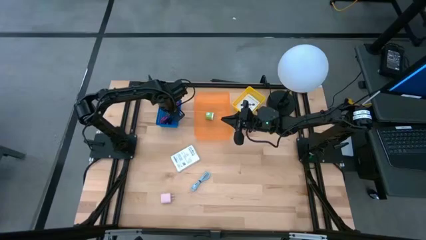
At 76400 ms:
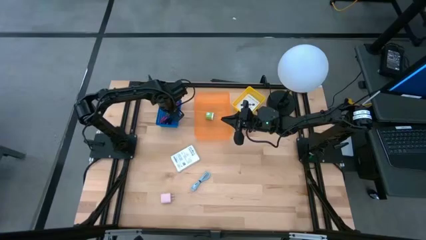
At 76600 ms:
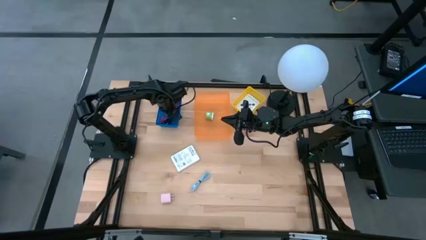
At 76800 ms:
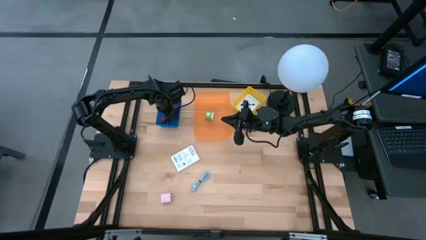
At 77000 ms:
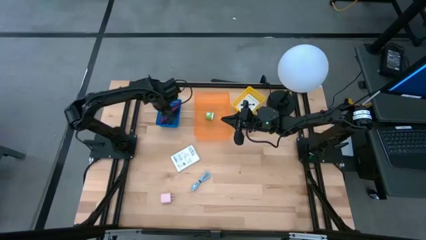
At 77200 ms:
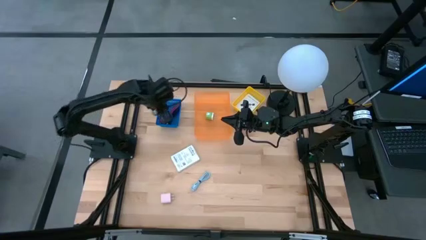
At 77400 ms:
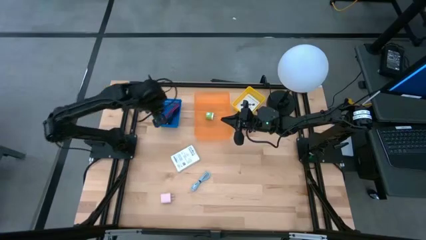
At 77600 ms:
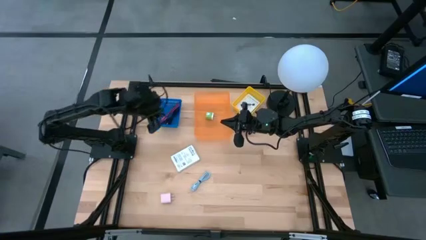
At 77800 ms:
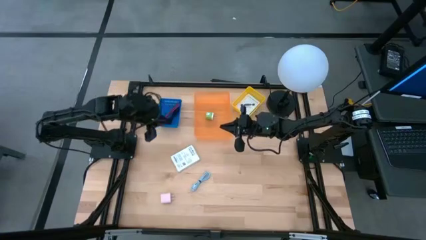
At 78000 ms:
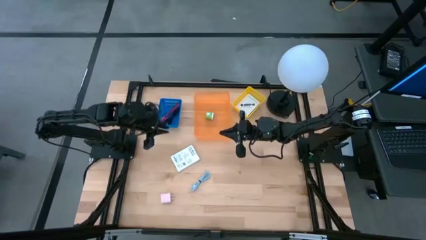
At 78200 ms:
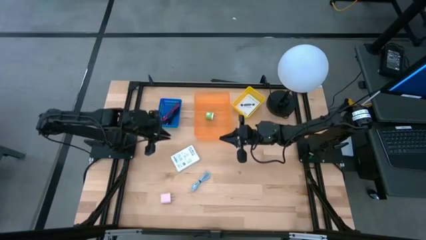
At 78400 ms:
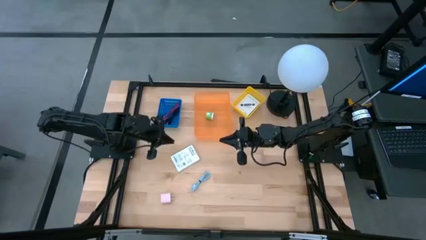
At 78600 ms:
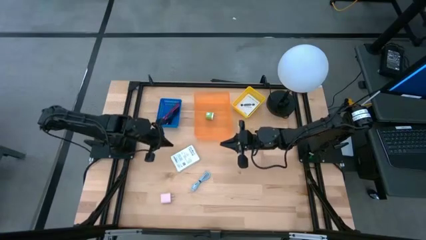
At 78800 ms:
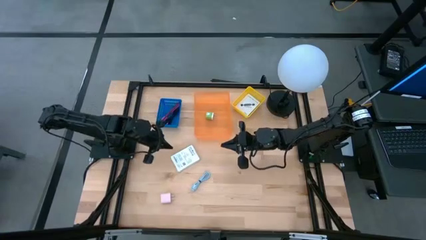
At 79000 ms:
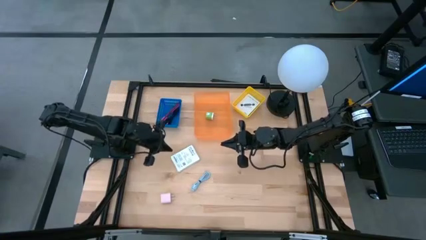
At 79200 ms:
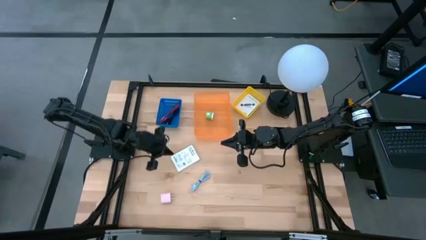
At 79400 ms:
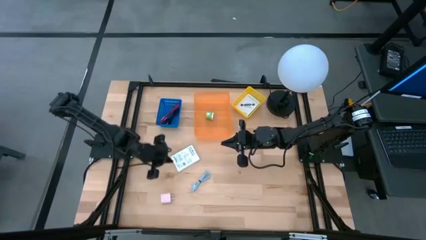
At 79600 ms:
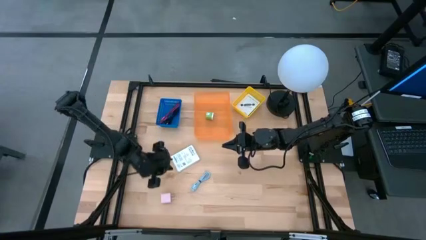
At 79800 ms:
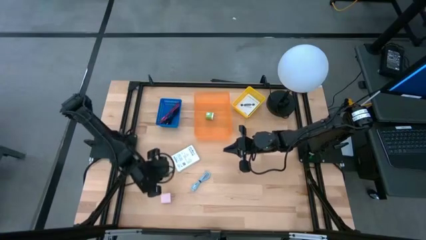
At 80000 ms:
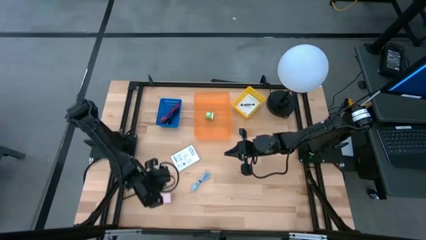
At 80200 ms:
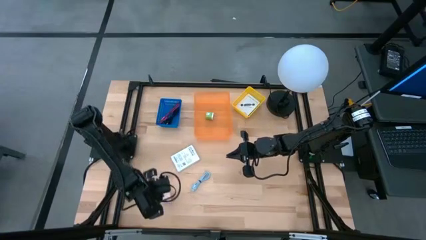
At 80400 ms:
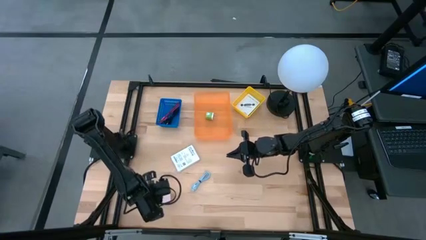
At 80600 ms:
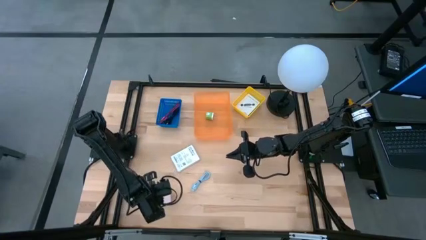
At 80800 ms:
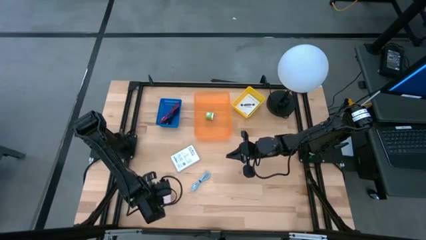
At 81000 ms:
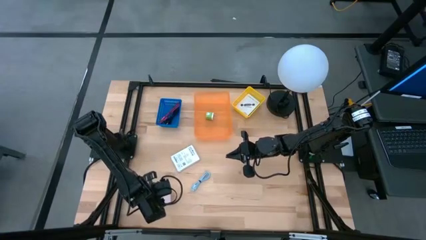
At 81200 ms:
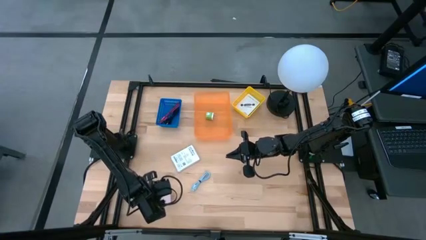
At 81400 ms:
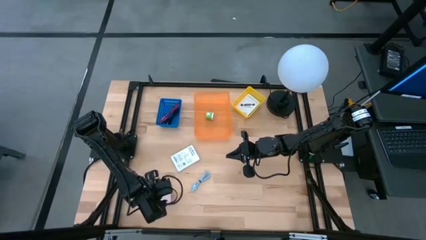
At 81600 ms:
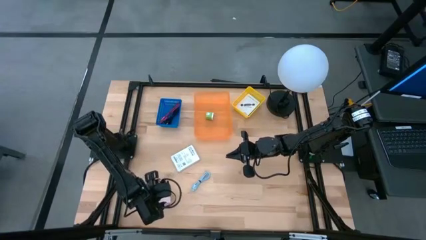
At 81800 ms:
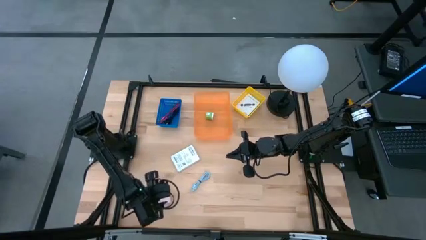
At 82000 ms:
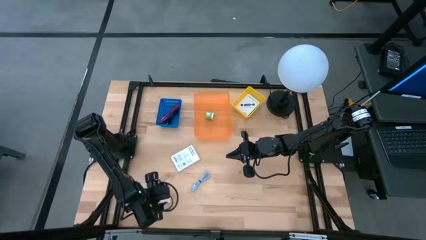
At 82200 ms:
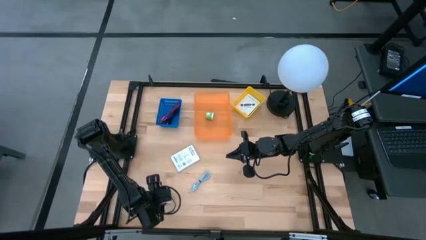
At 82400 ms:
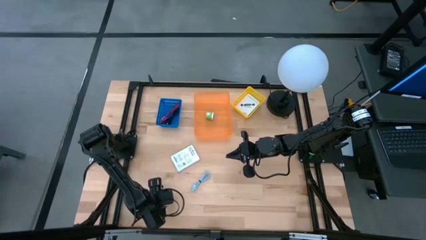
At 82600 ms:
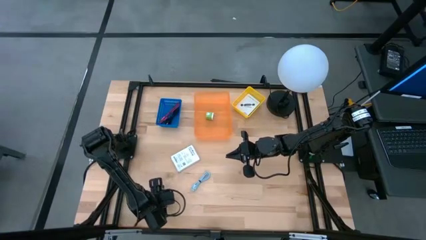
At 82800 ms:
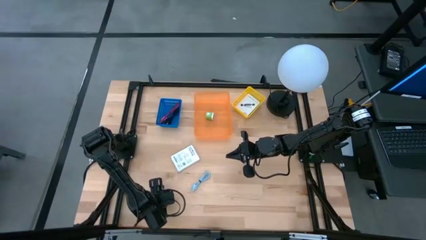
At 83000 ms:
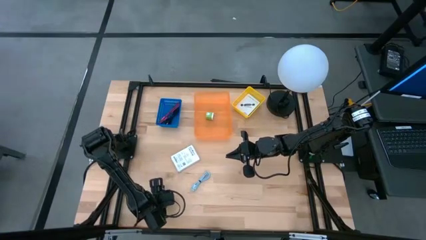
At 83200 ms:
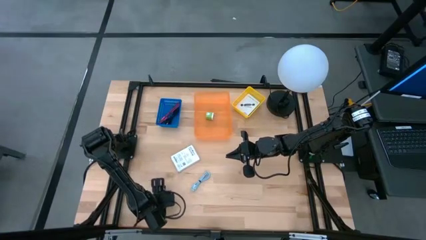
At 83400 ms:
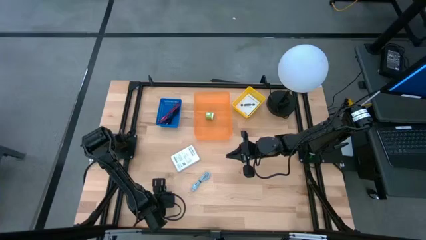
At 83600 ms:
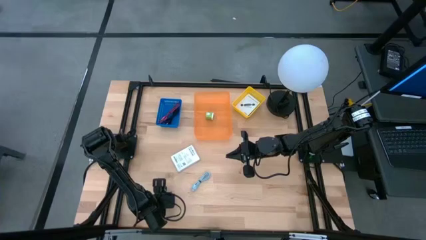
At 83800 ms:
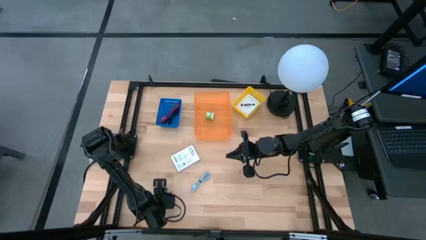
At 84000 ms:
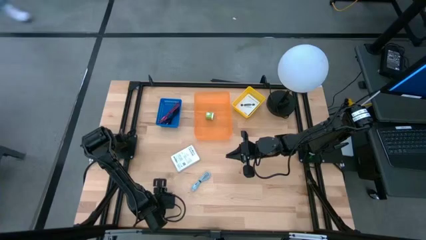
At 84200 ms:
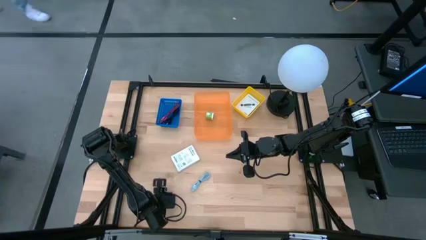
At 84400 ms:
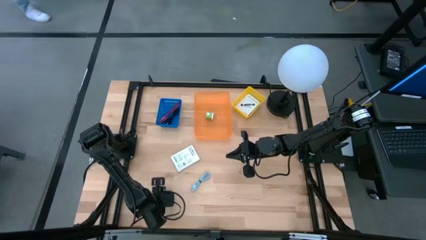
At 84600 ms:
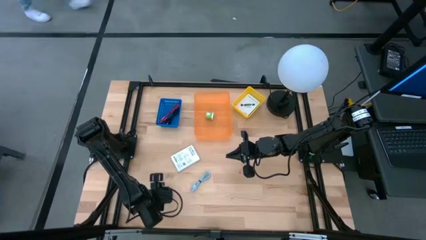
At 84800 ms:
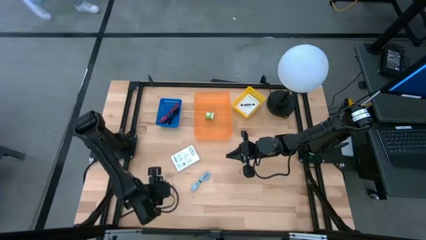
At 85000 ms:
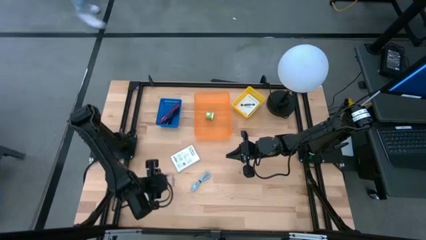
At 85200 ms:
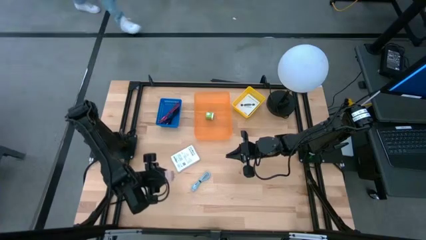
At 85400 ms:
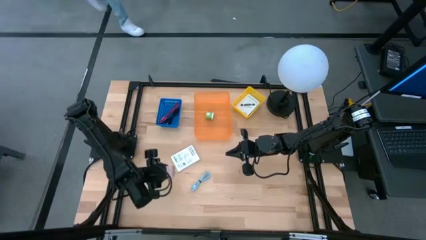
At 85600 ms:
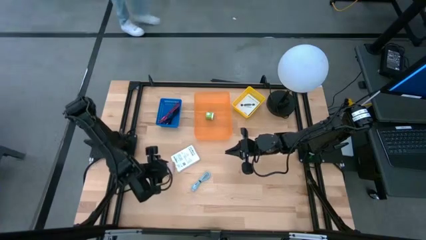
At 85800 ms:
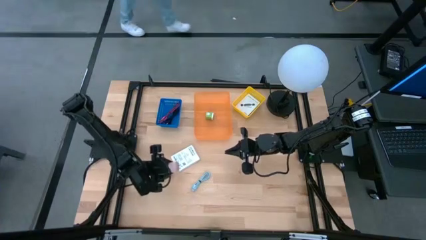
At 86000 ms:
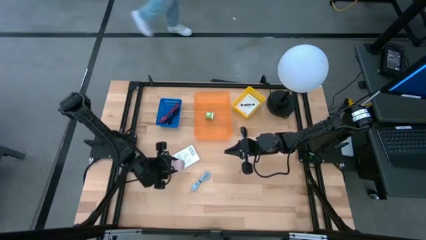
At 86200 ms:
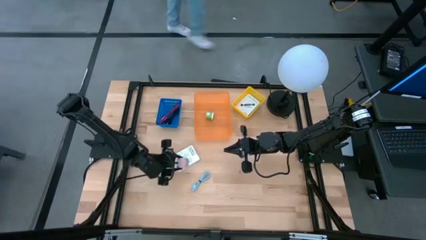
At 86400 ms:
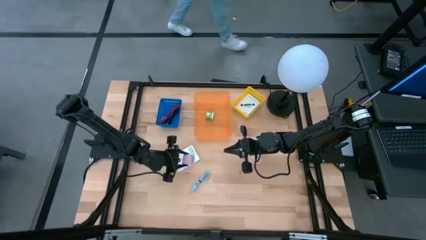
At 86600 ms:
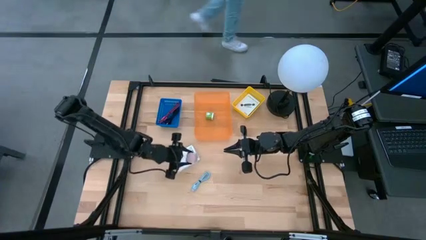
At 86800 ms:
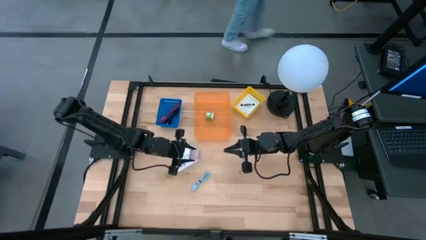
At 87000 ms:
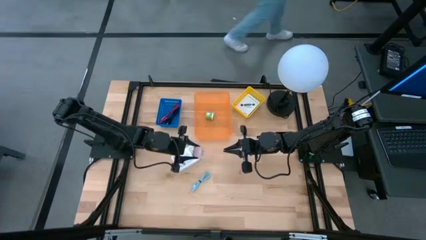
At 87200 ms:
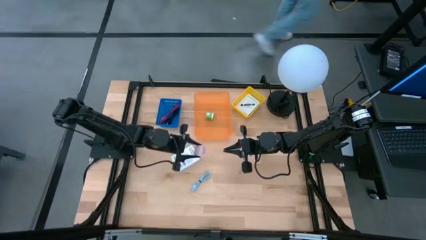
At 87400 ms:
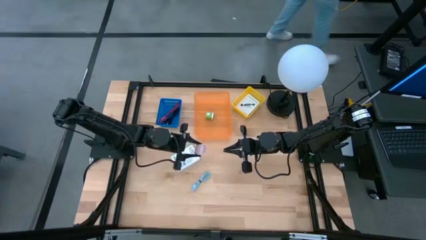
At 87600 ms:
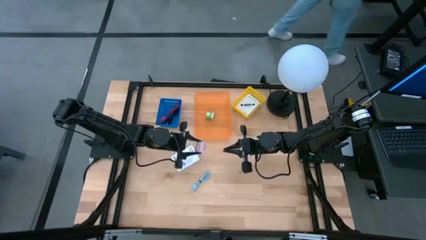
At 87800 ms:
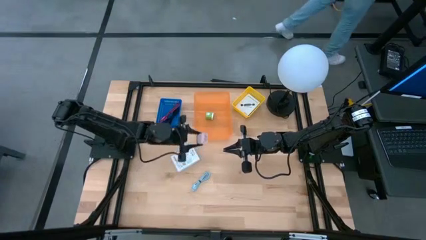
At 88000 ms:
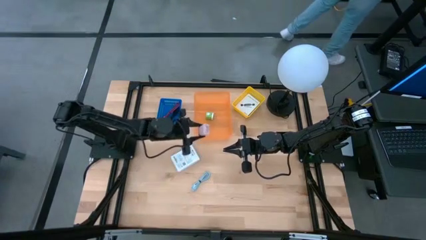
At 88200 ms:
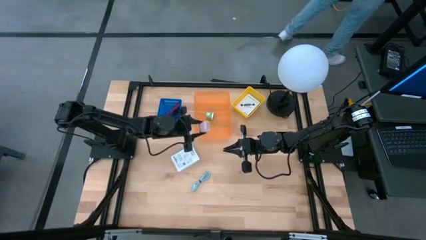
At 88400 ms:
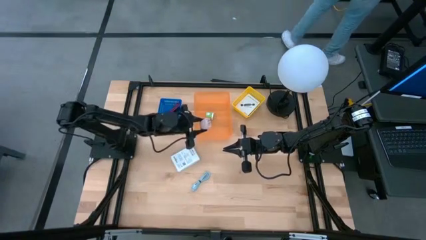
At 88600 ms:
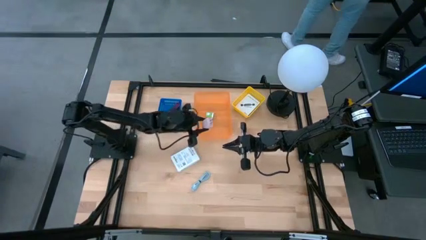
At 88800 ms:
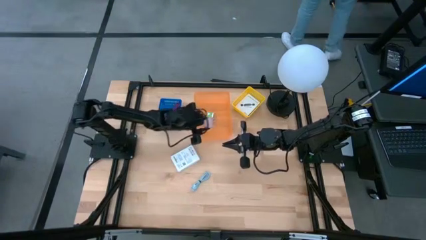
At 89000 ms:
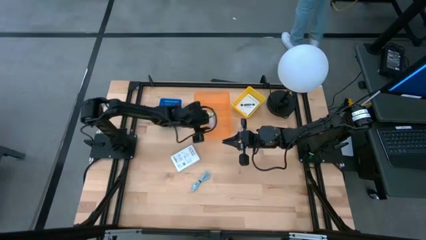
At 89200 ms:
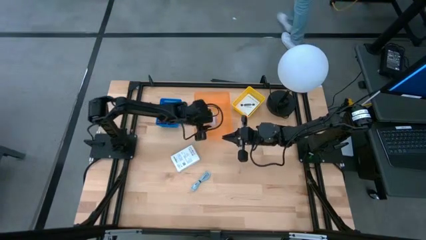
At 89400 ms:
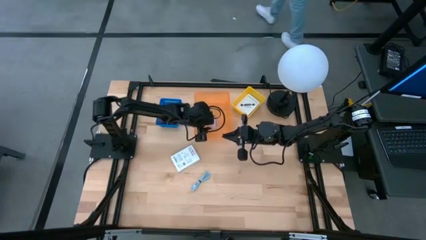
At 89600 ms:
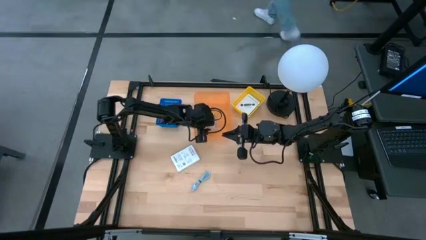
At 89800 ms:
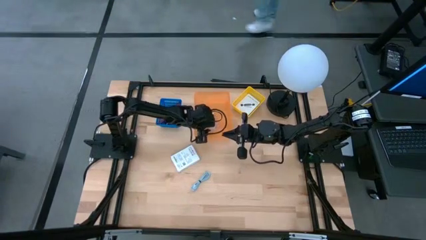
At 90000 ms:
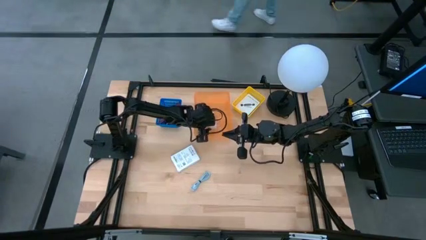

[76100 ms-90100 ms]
Task: Pick and place items into bin
Put the light pink adaptor into the orange bin
